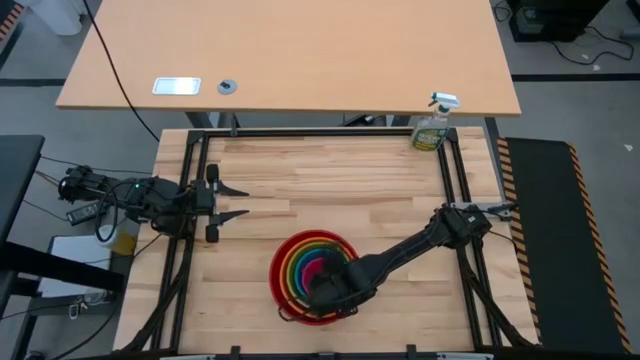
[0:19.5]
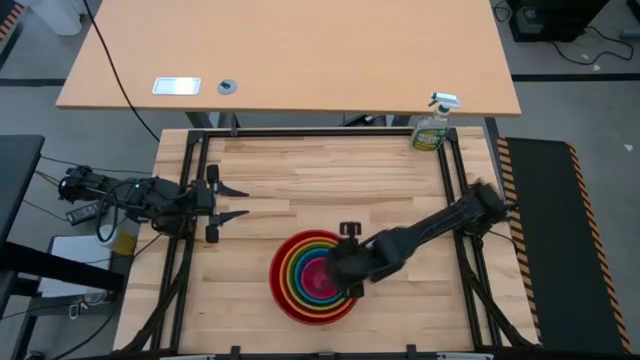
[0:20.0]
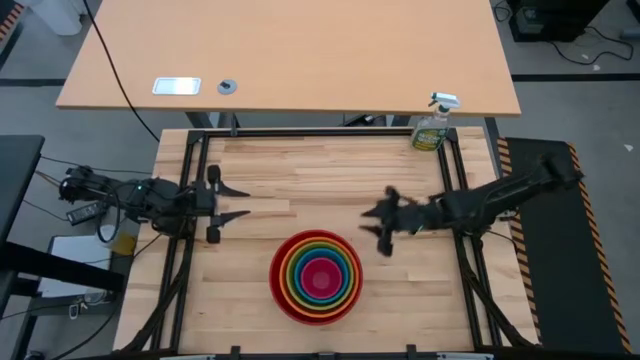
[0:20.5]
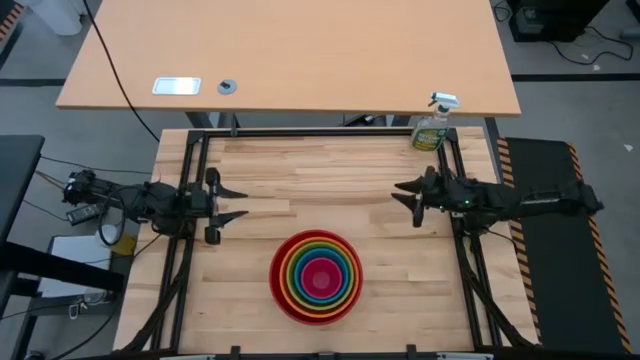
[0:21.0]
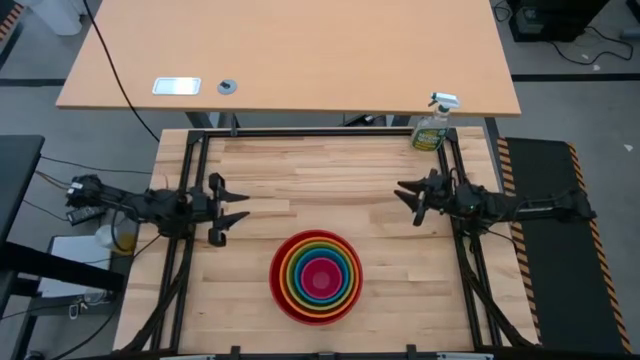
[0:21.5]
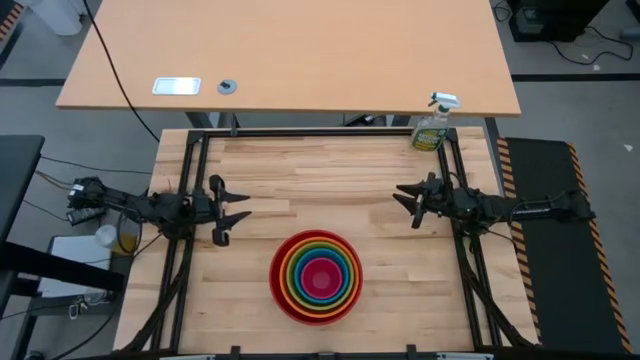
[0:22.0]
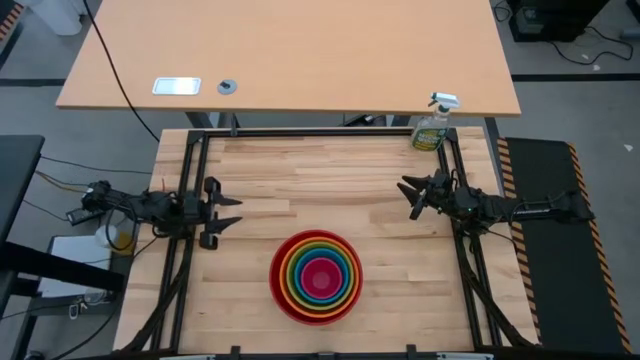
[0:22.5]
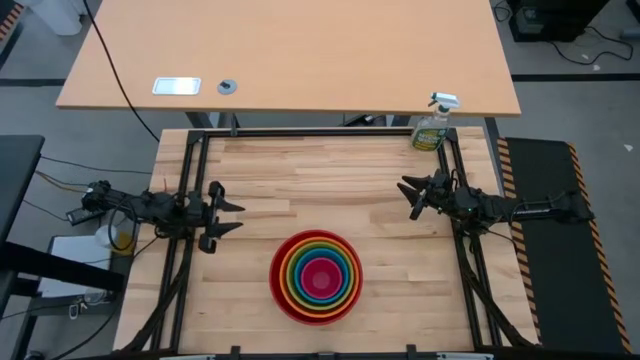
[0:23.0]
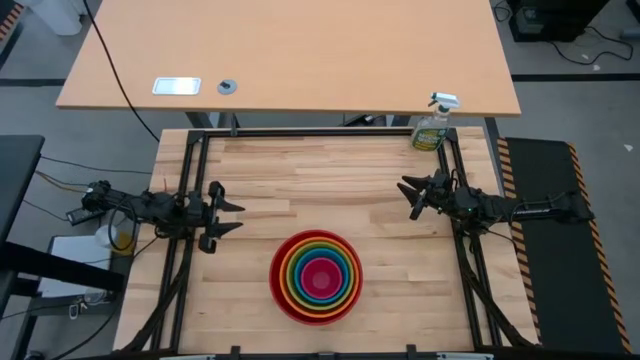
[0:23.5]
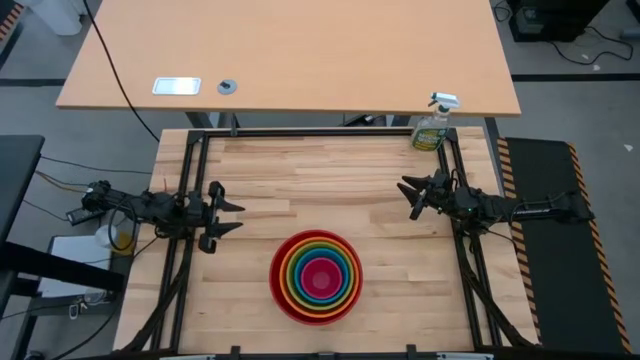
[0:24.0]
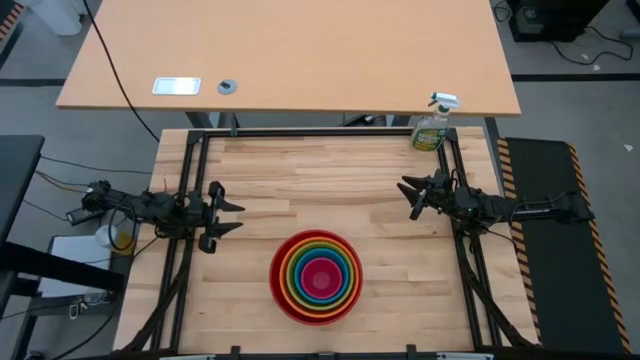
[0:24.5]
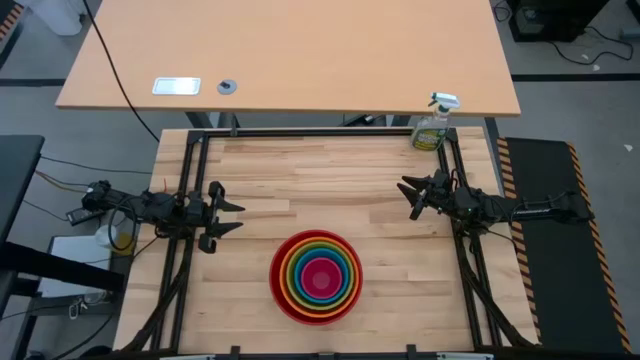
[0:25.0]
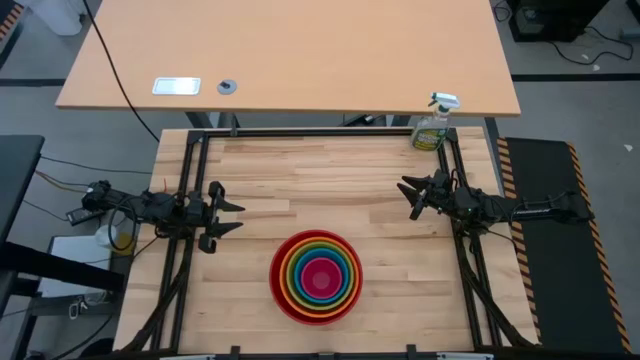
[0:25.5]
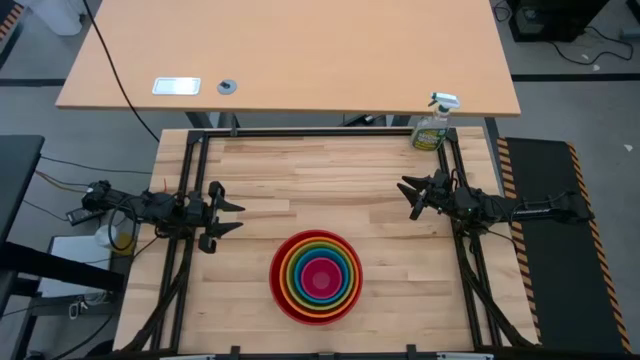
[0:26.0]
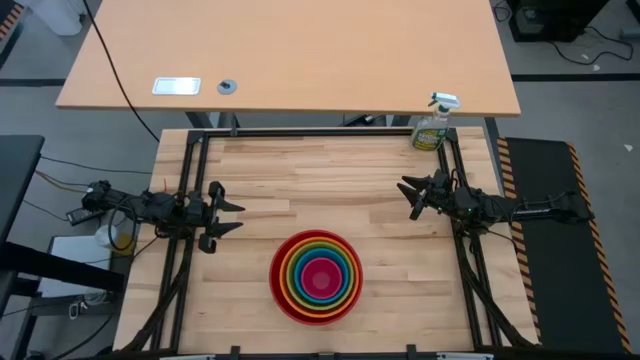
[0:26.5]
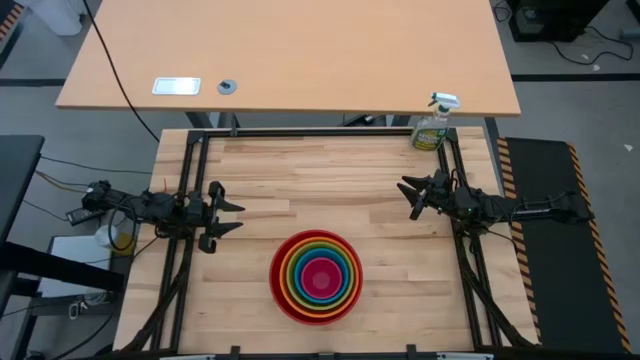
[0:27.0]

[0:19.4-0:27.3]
Return to Home Position

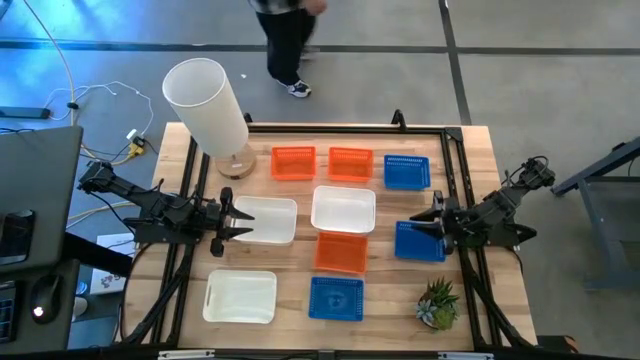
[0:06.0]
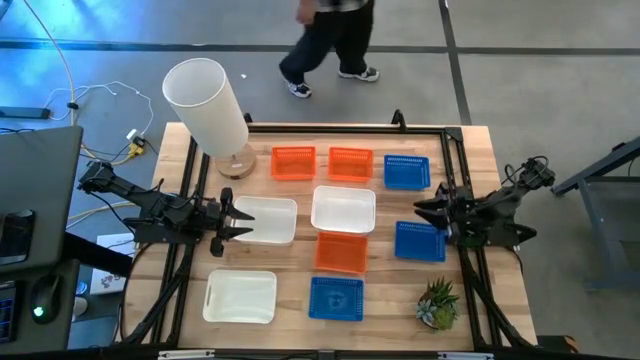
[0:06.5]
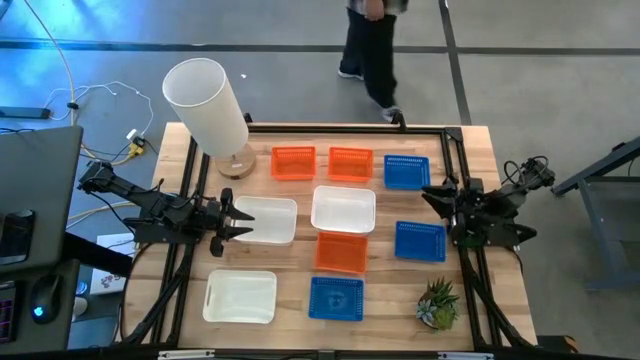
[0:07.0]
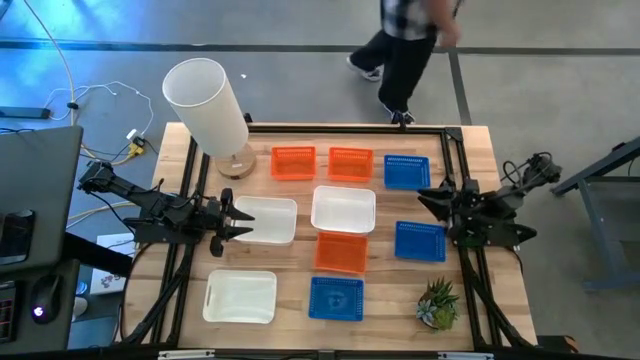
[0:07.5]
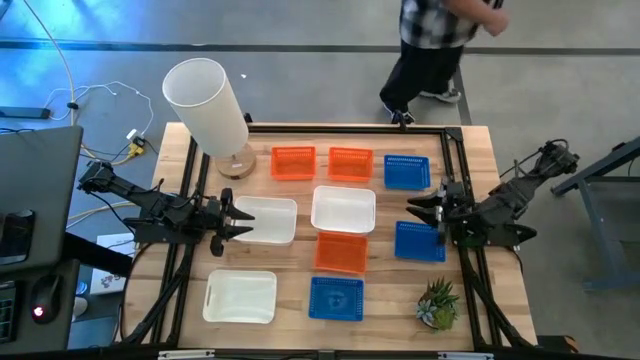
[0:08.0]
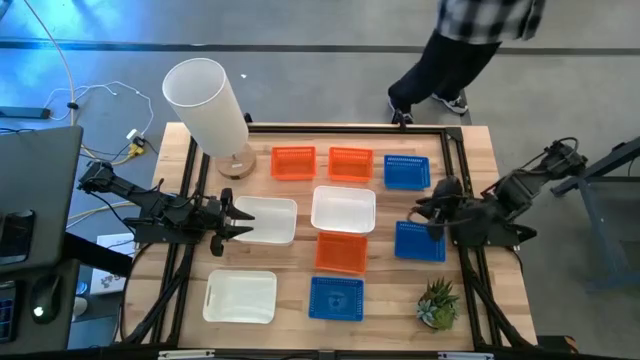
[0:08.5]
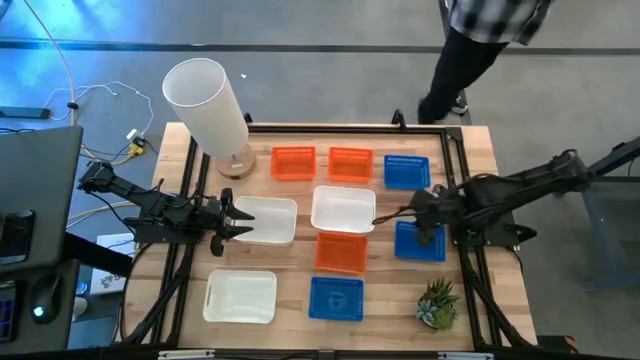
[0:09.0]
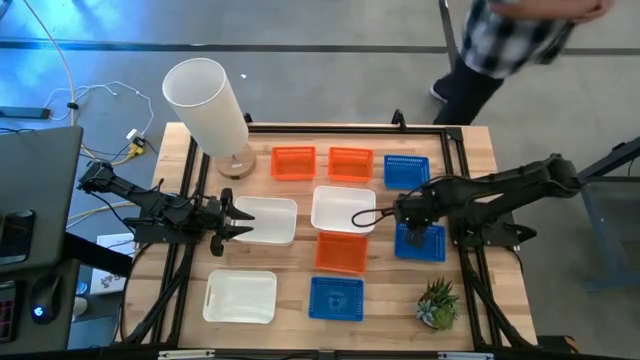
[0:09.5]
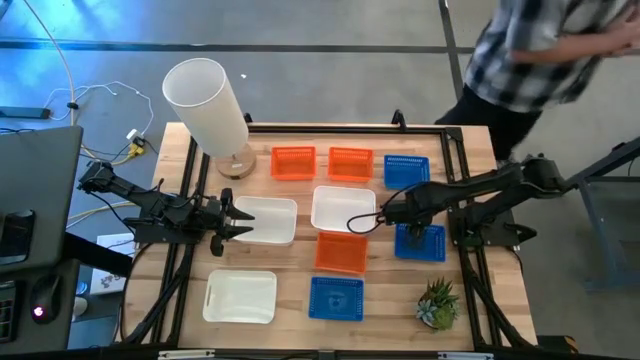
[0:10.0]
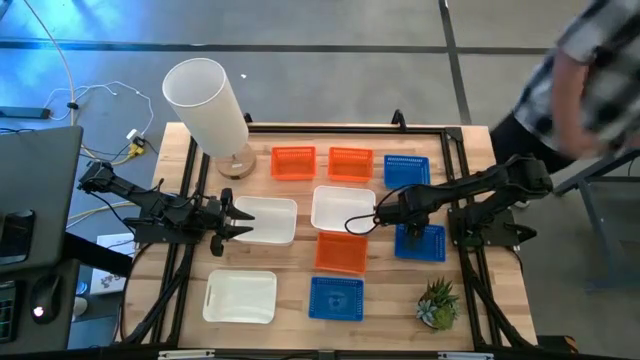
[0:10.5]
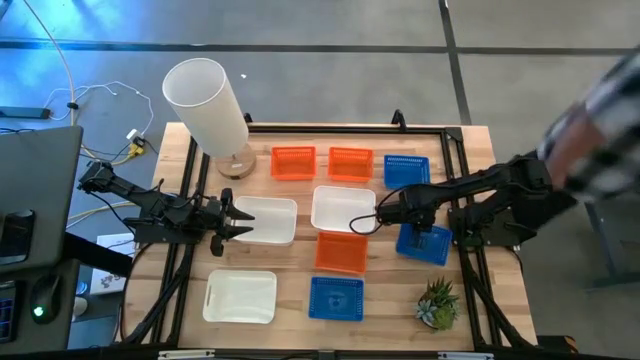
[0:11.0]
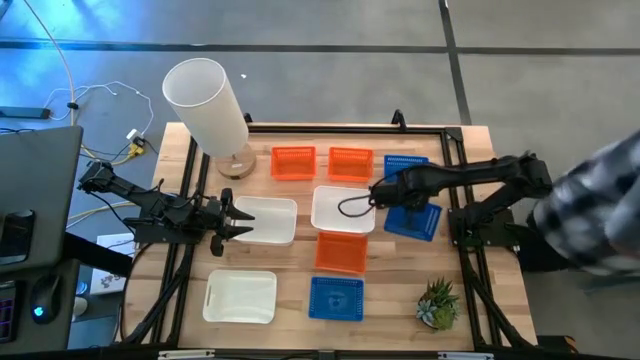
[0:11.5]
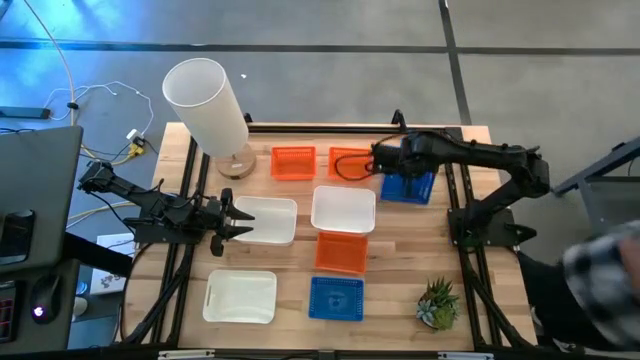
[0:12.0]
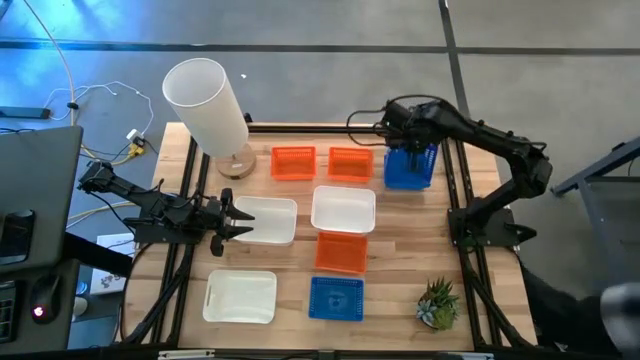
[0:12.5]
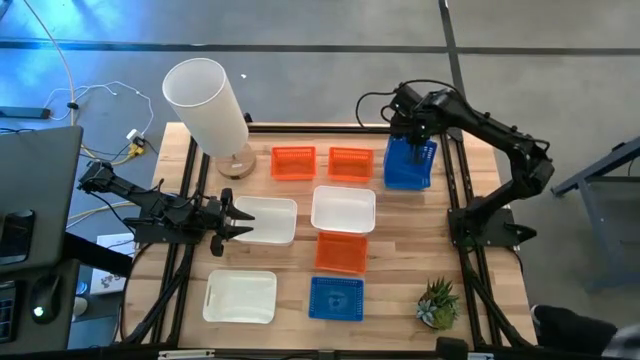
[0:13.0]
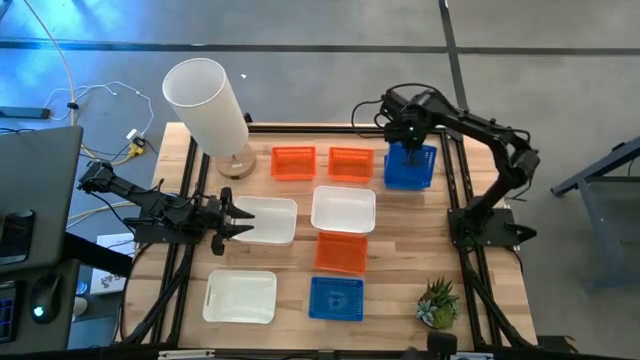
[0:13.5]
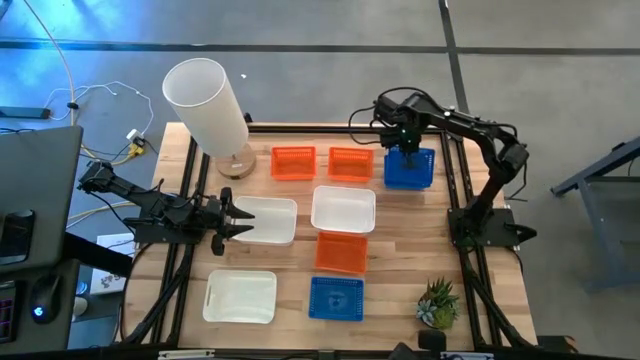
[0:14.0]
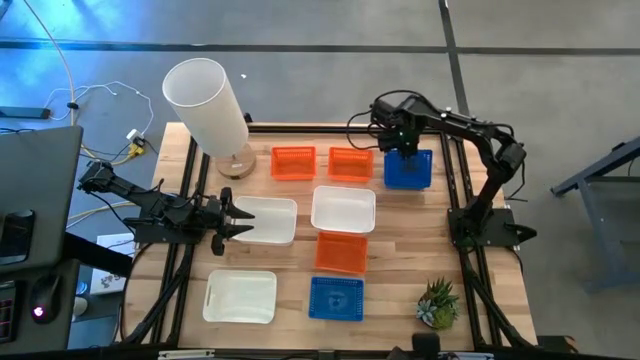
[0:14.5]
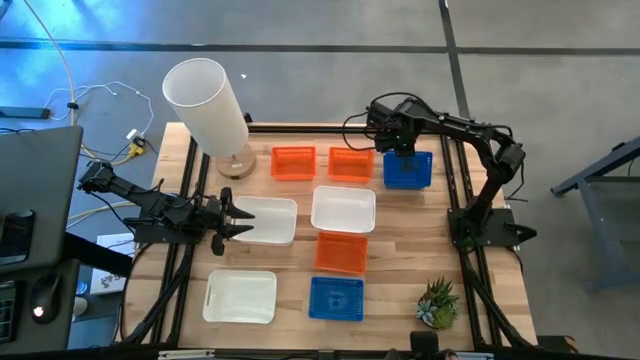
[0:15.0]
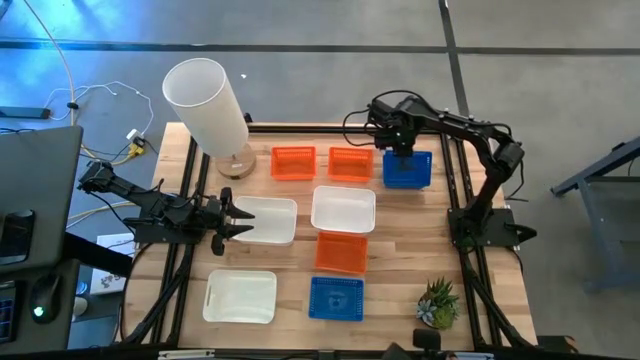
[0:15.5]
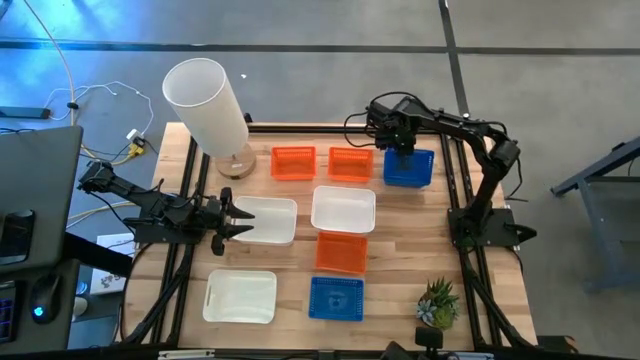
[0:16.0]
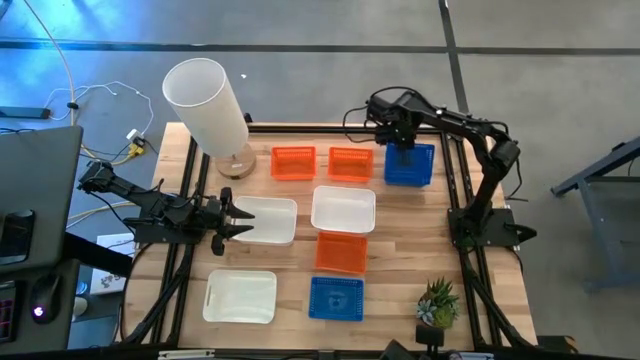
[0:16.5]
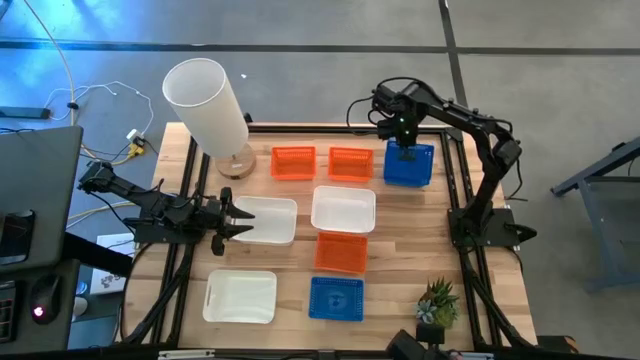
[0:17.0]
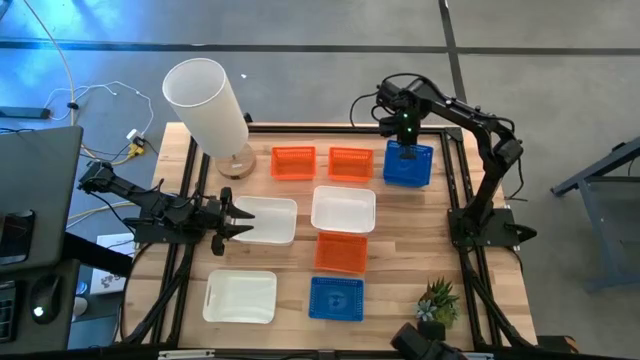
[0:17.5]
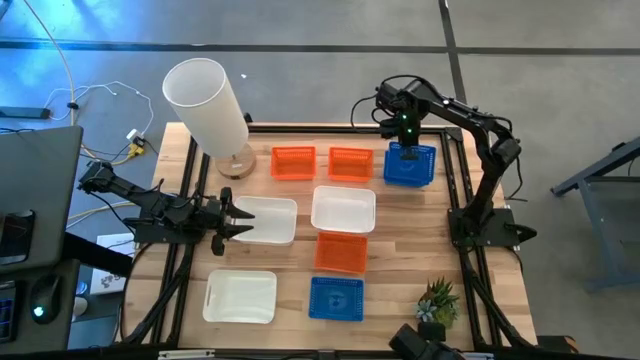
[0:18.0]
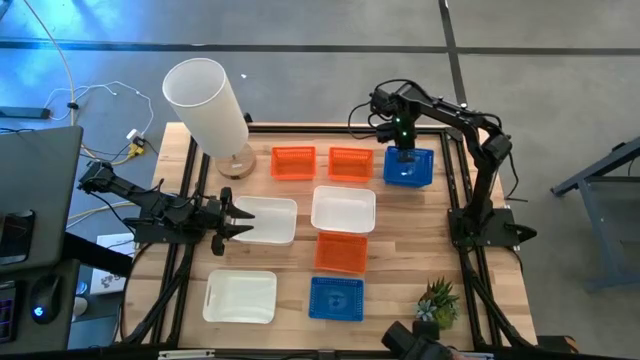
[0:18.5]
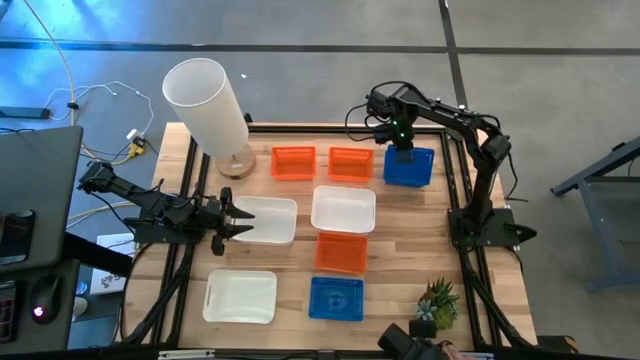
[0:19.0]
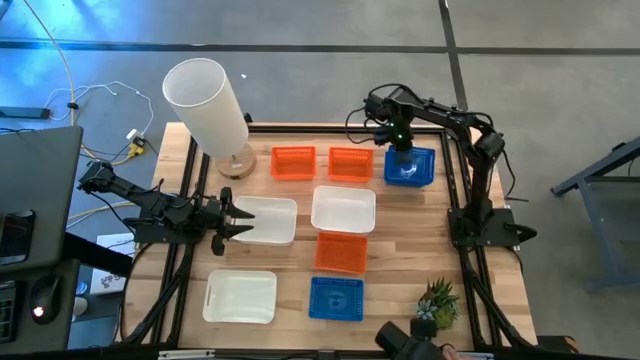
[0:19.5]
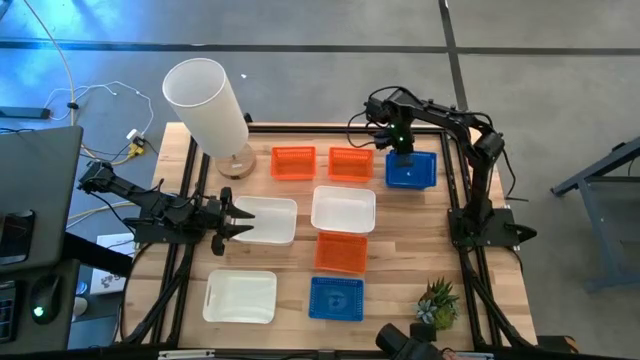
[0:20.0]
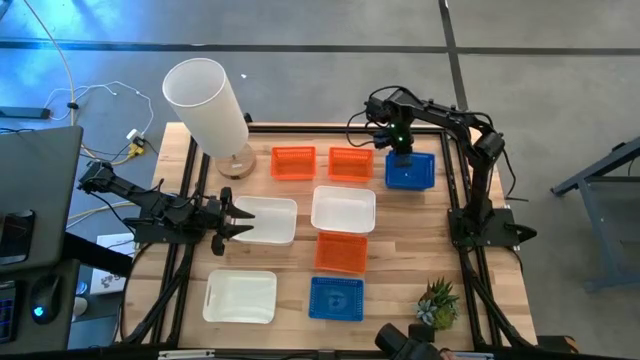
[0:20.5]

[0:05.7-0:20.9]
Stack the middle blue bin on the top blue bin
